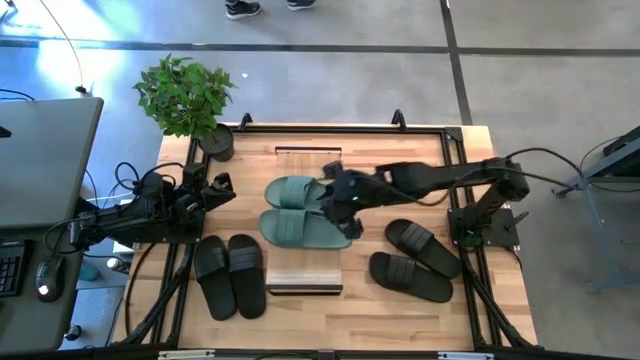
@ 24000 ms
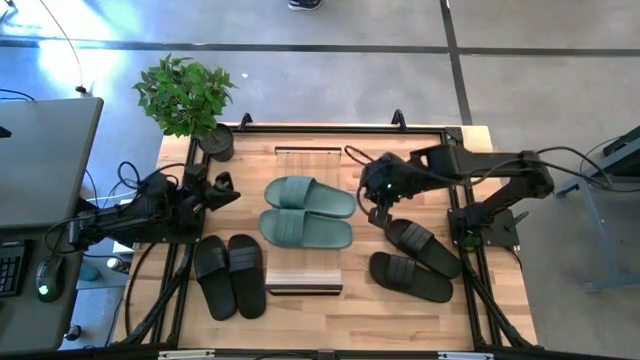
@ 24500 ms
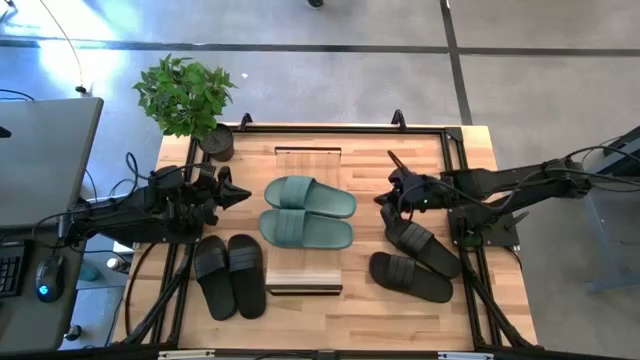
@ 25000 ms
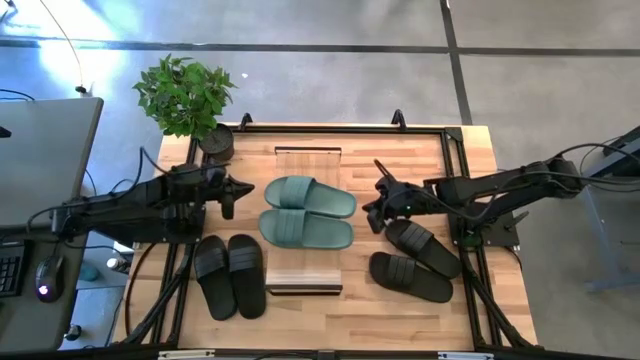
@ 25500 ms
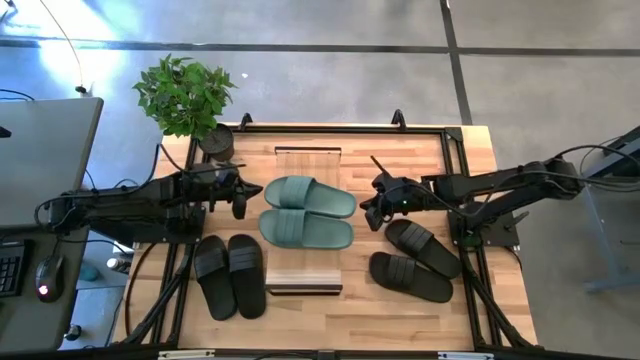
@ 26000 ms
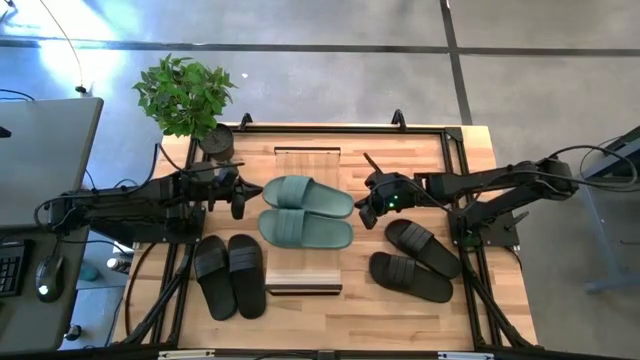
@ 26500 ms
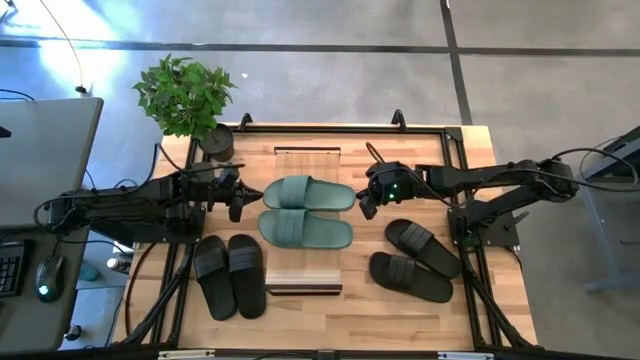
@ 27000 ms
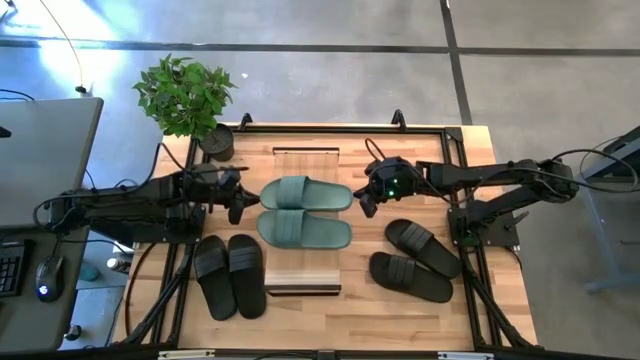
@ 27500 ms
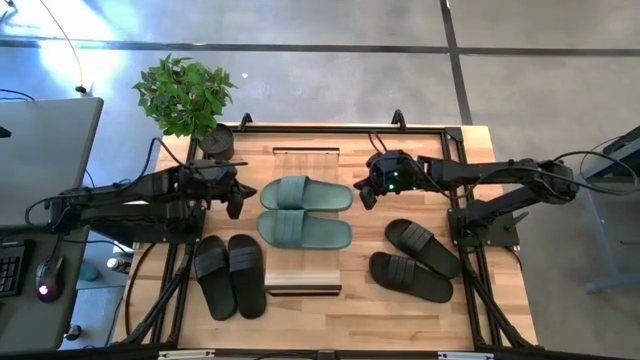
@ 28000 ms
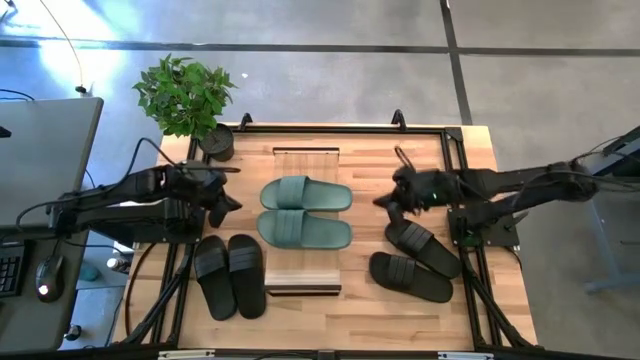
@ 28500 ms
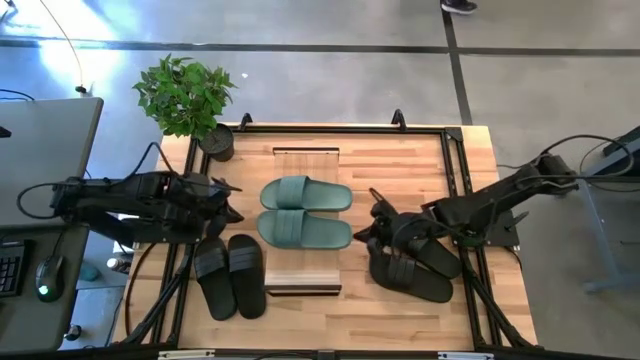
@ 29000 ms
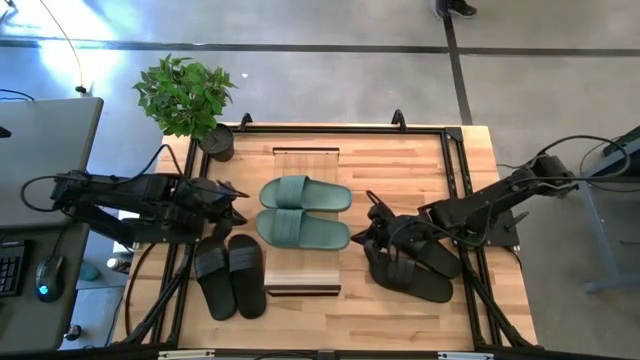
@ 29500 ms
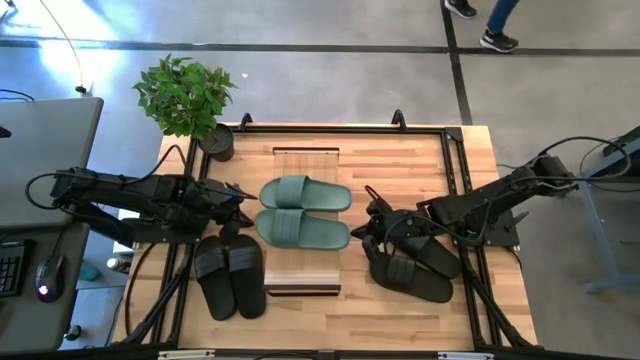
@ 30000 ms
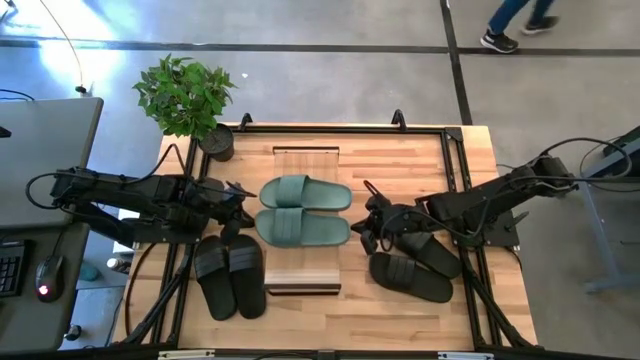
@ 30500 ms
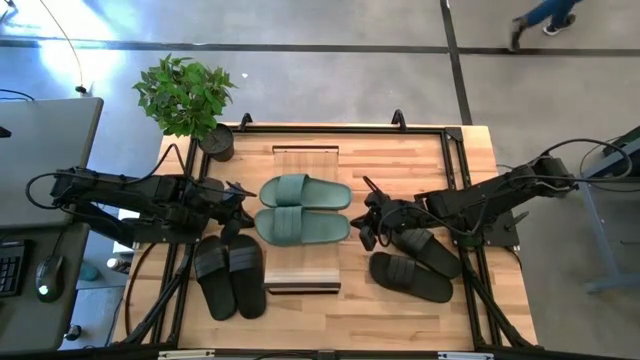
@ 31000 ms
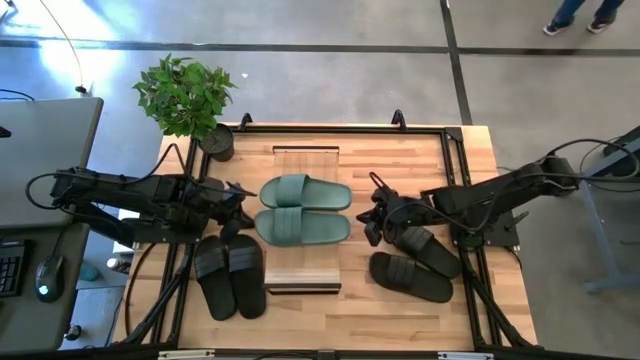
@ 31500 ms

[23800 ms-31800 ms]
Task: Pick and place slides into the shelf
Adjust the green slippers on the shelf

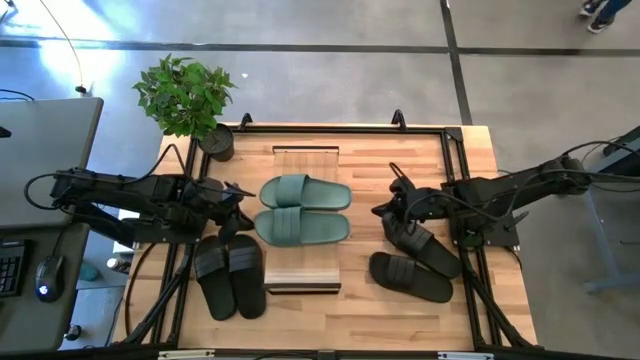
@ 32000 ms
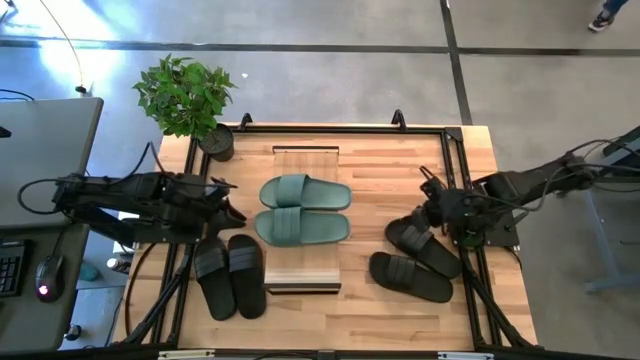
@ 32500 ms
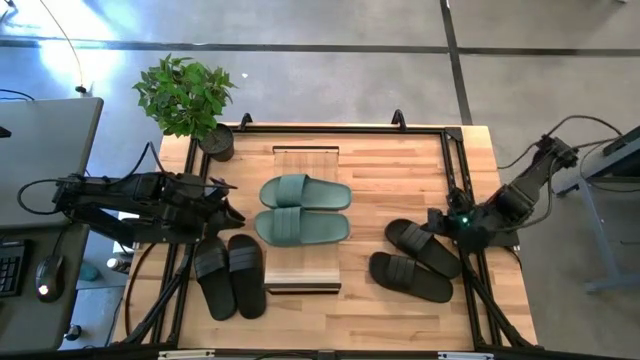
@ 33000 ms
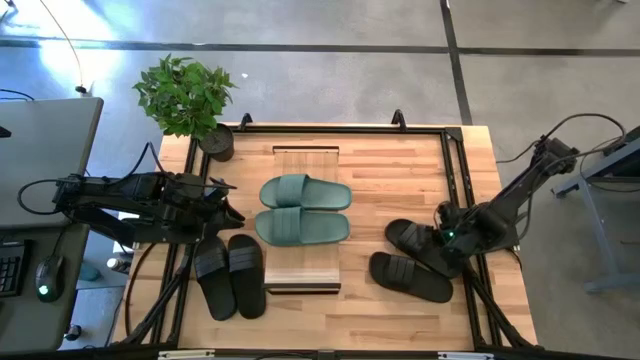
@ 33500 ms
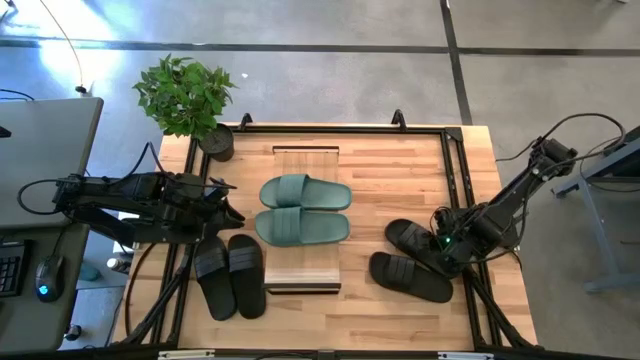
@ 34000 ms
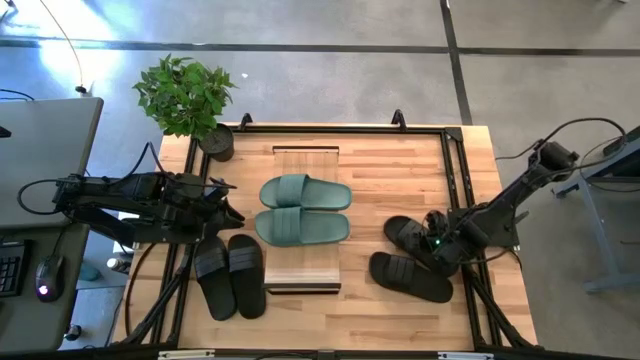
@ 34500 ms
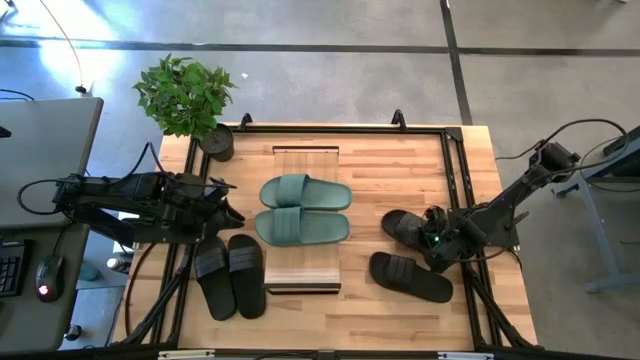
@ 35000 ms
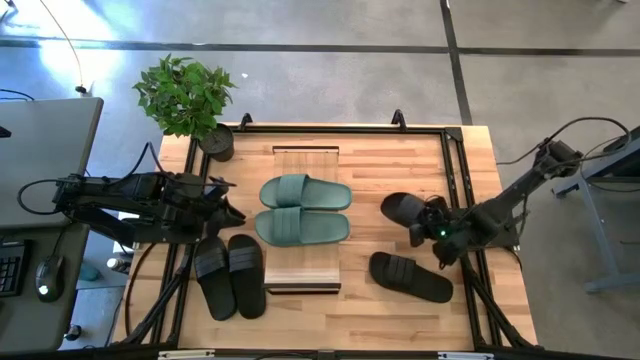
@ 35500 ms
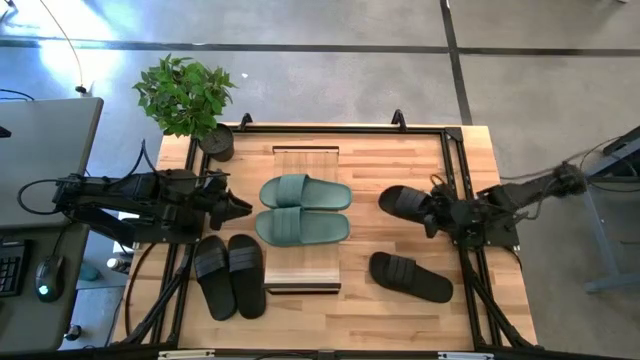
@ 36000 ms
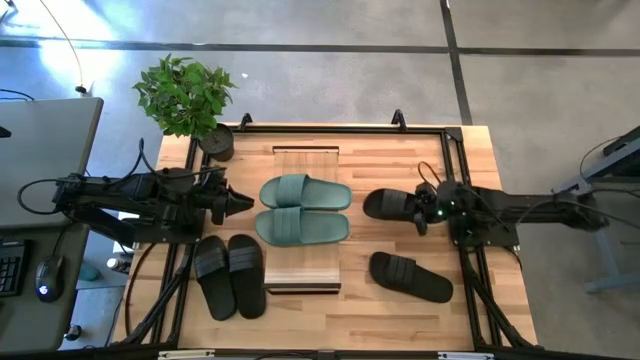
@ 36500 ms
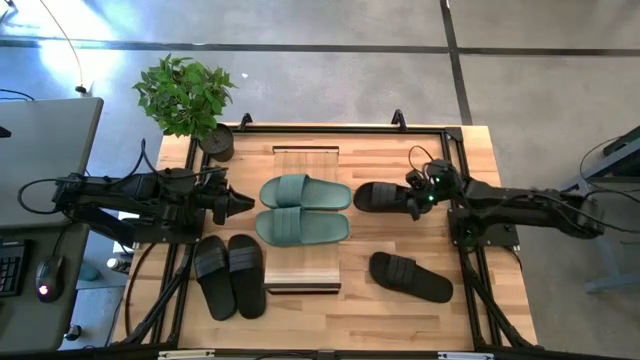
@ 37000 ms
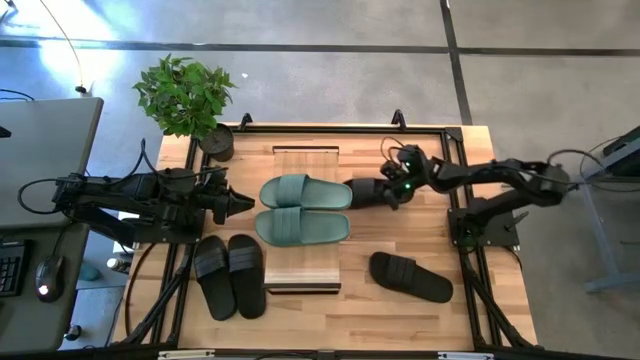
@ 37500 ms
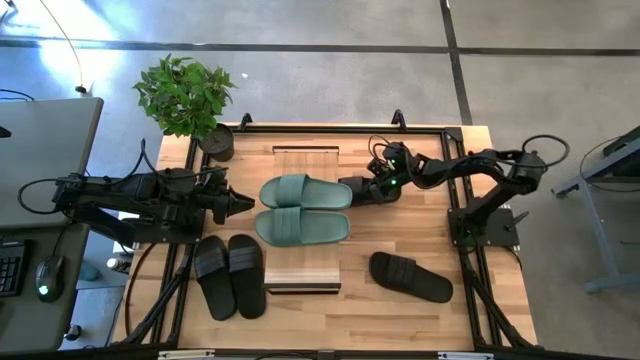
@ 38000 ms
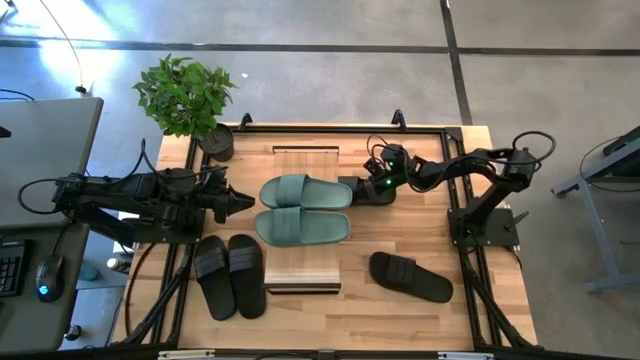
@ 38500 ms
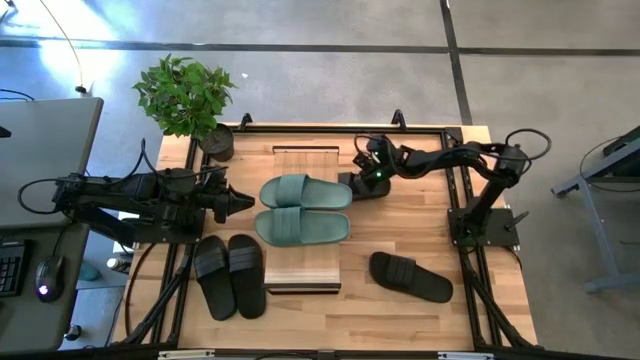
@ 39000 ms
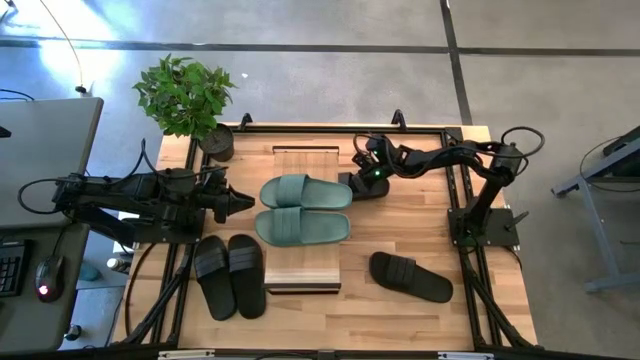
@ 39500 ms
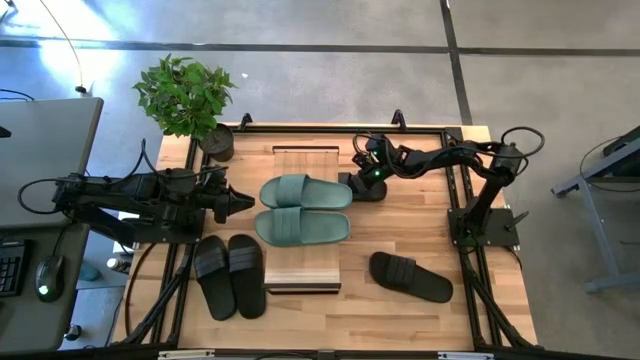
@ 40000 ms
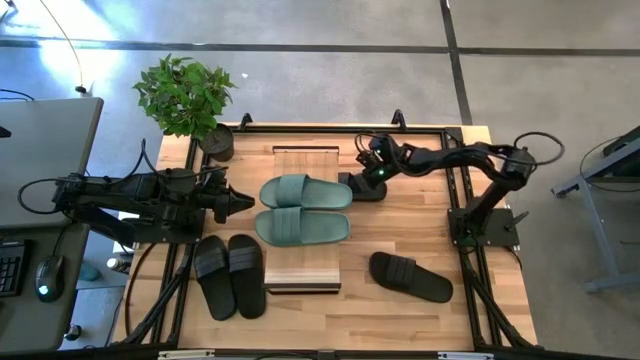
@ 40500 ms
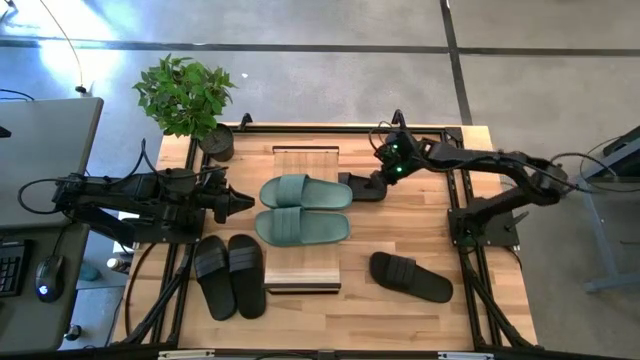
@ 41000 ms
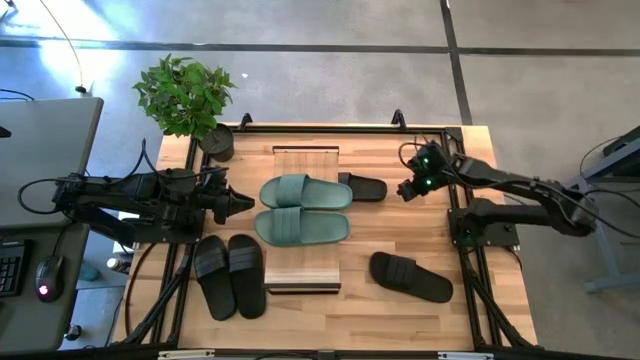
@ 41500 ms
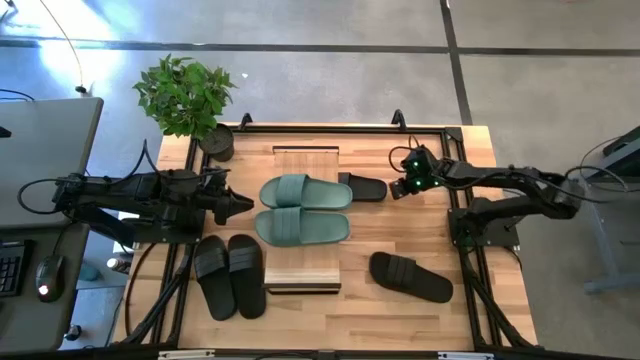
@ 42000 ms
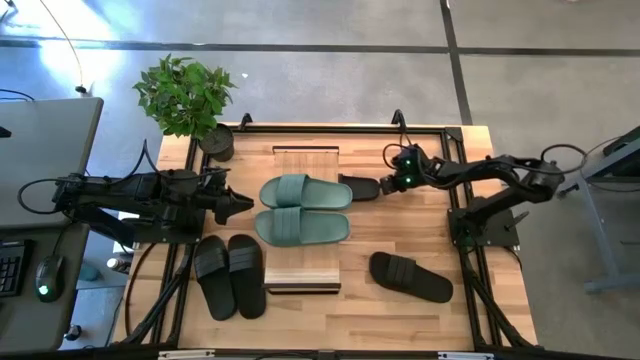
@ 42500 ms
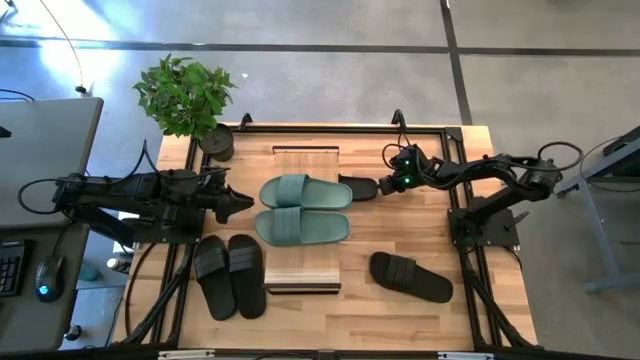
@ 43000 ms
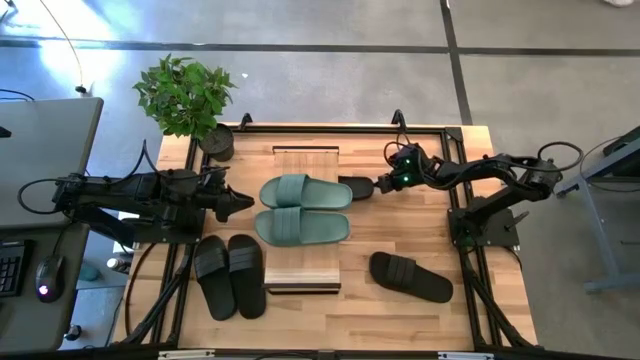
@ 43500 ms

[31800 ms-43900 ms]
Put the black slipper under the shelf

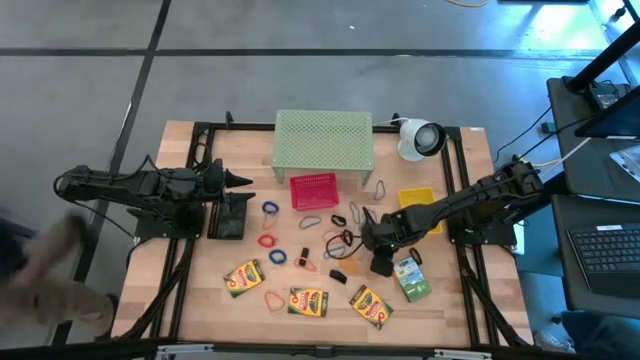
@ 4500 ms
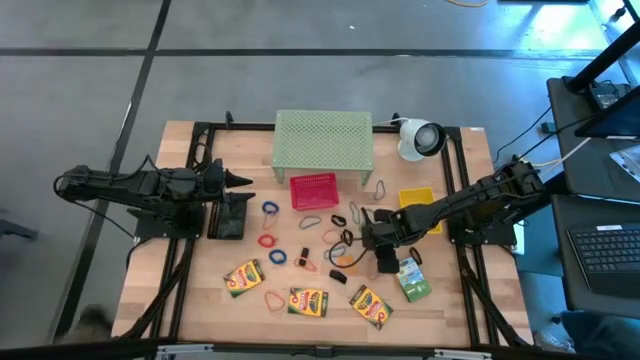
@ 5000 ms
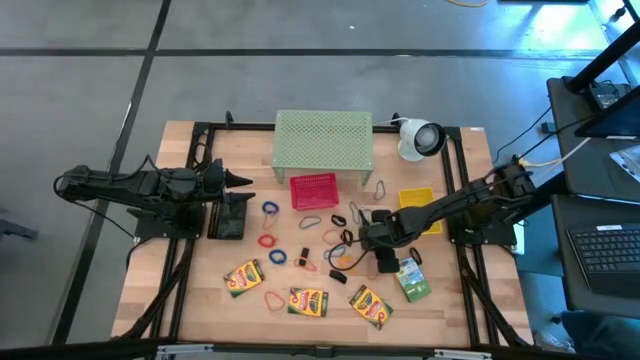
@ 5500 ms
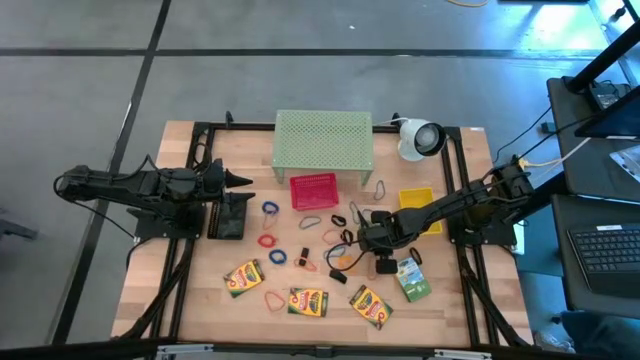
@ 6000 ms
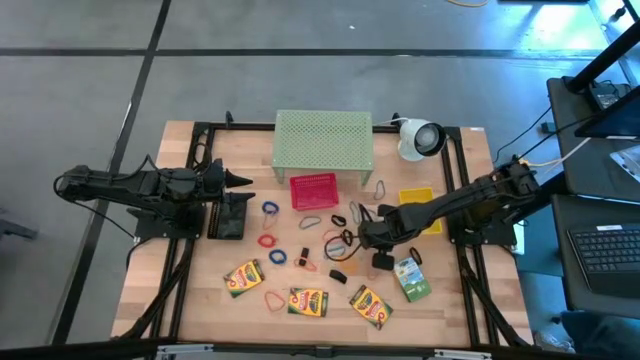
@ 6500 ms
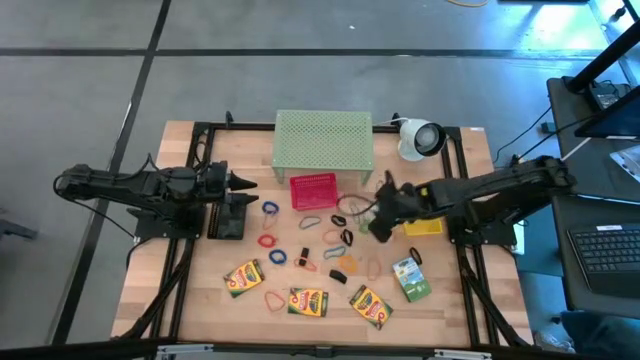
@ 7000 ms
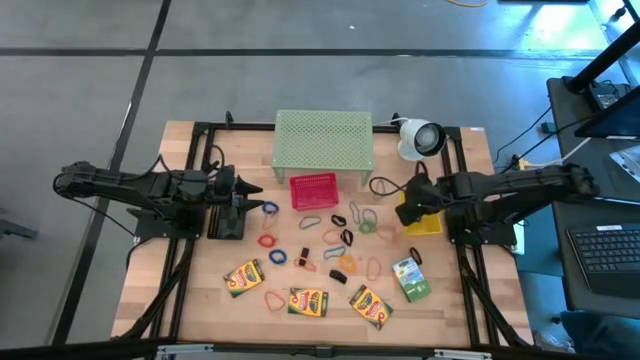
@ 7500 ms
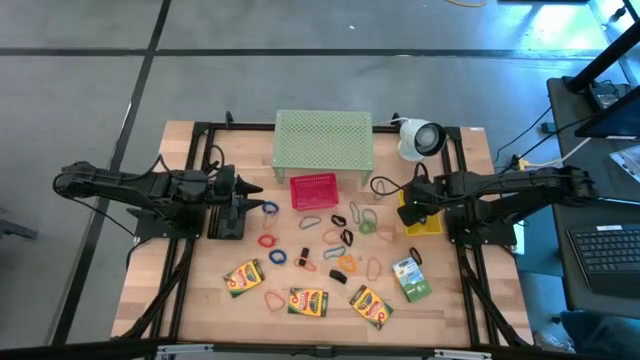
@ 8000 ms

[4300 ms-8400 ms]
Task: Pick & Place Office Desk Supplies
Put the blue spring keychain into the yellow bin
